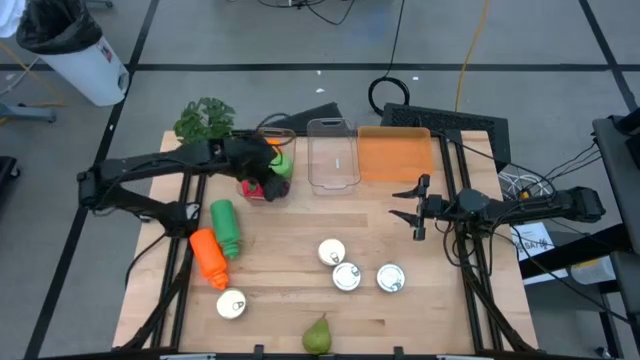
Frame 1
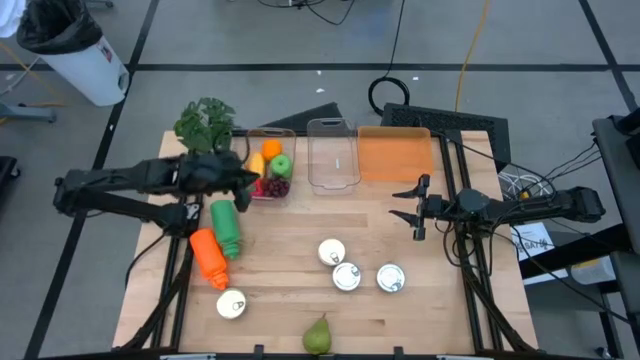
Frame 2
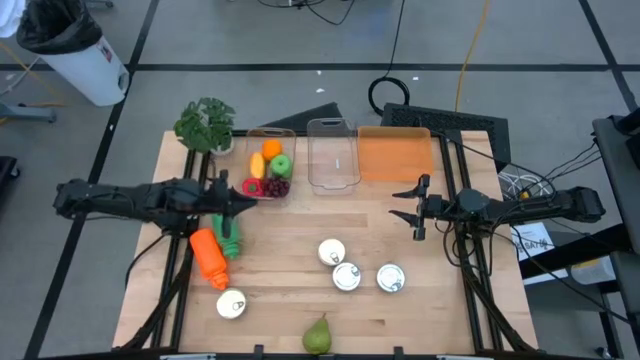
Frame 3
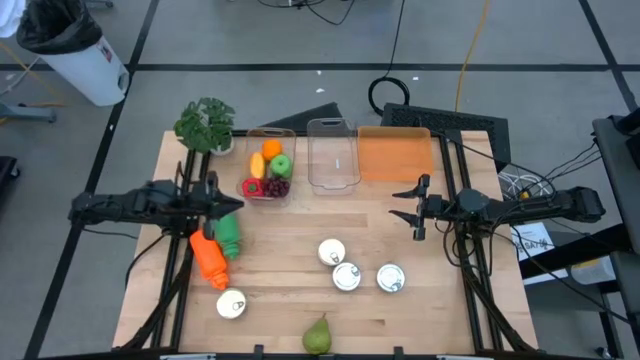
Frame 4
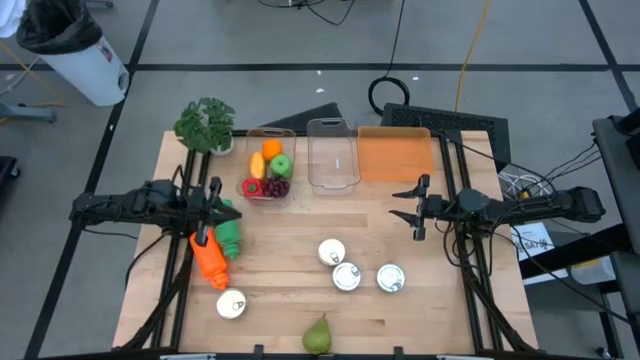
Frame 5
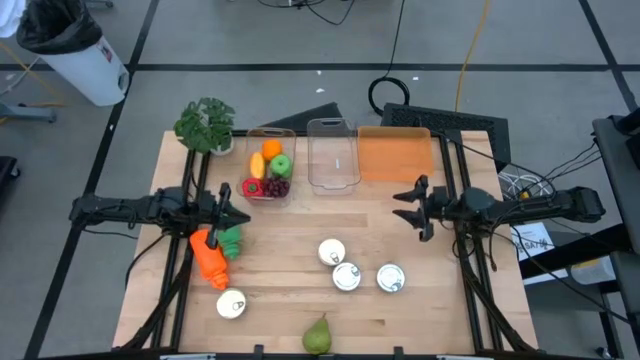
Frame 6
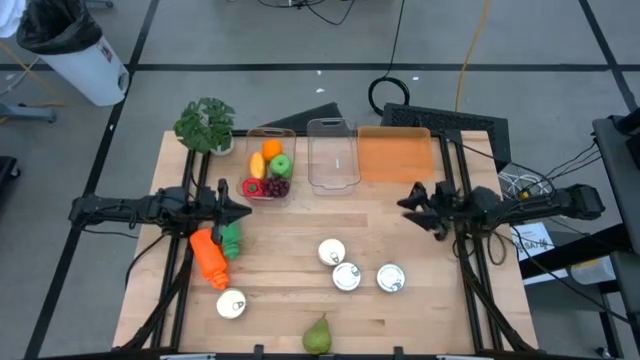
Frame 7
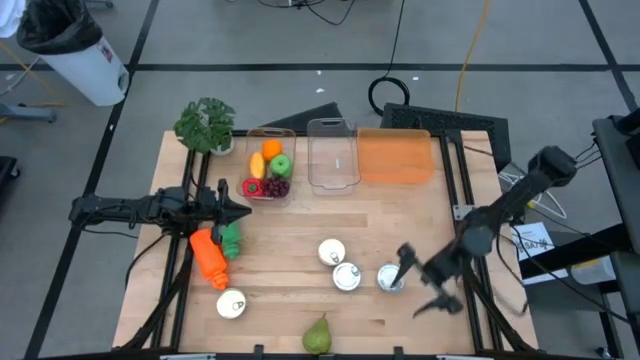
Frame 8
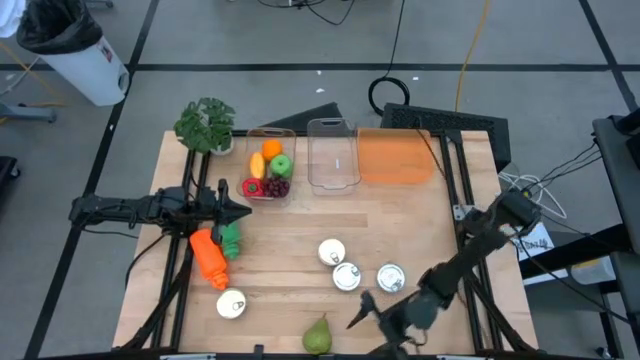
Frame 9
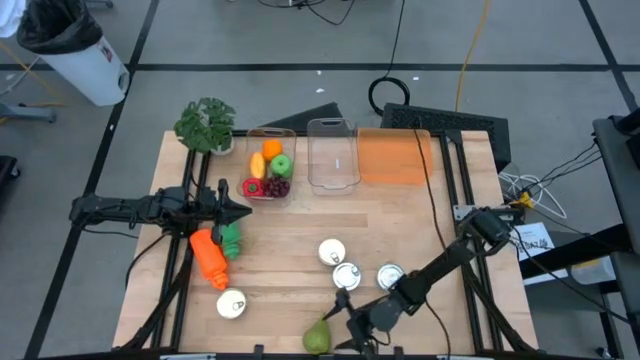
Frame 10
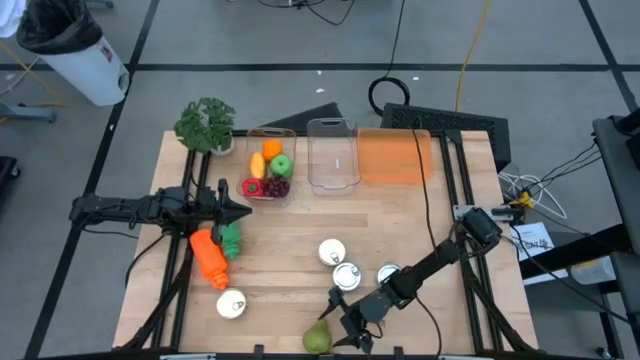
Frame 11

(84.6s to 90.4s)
Task: Pick & Place Food Item
Put the green pear into the left transparent bin

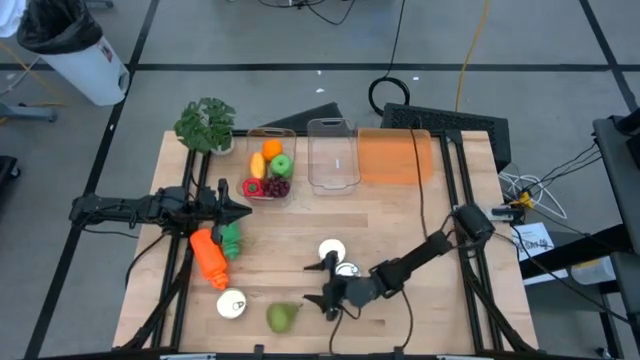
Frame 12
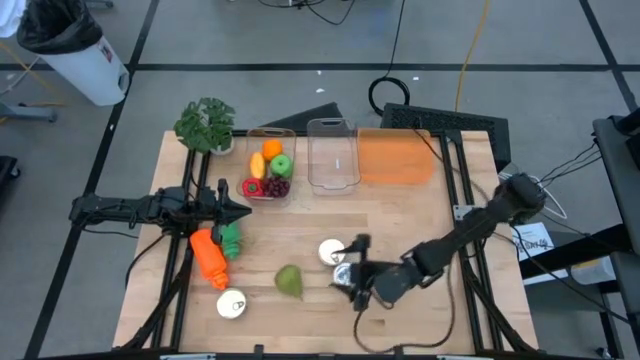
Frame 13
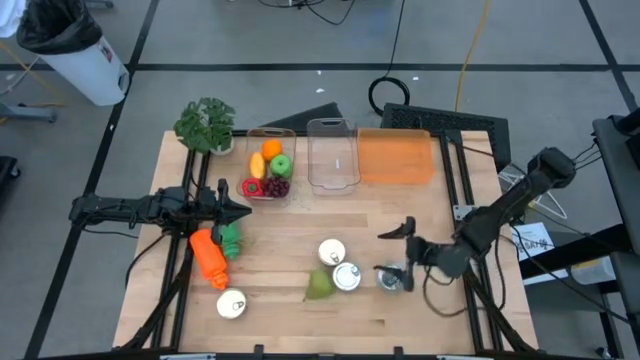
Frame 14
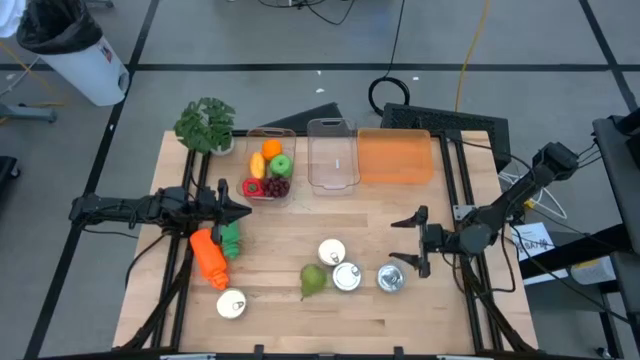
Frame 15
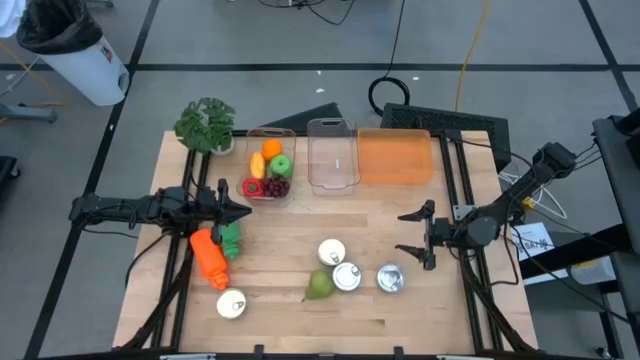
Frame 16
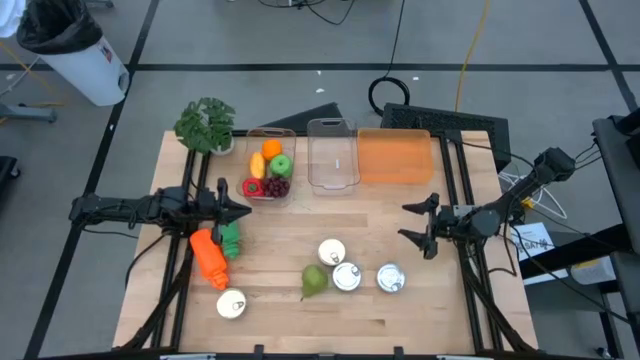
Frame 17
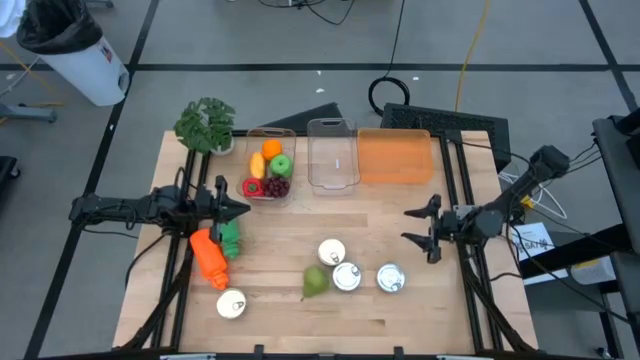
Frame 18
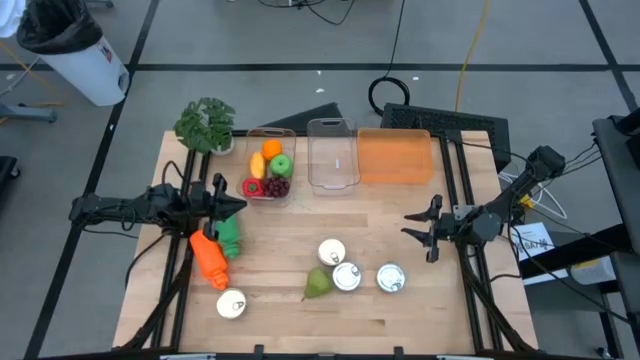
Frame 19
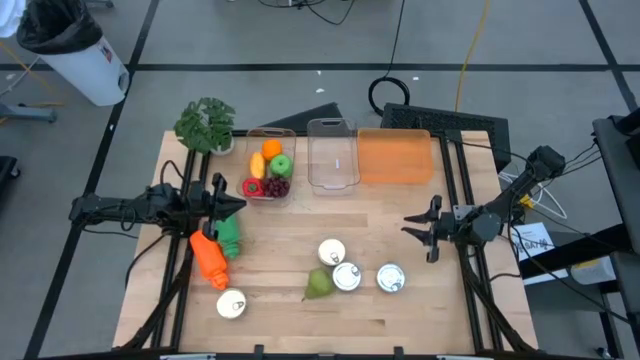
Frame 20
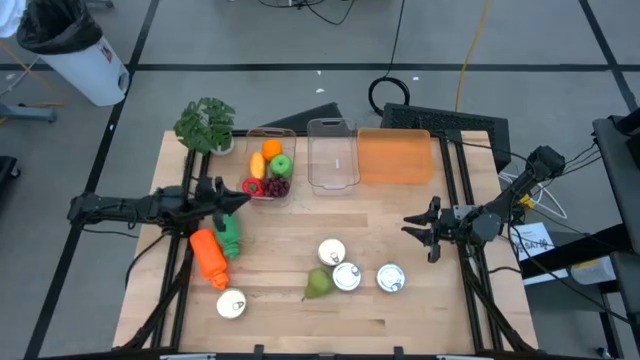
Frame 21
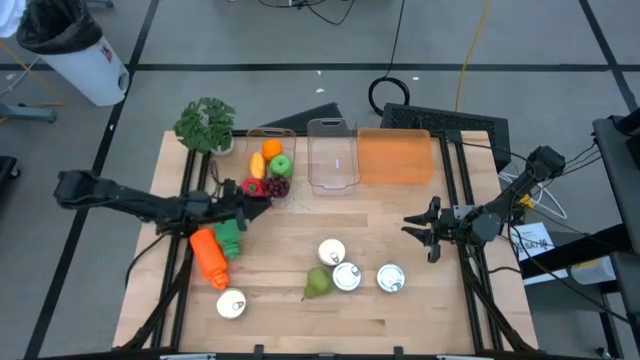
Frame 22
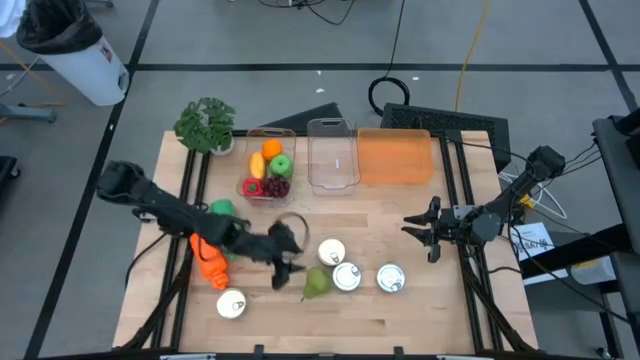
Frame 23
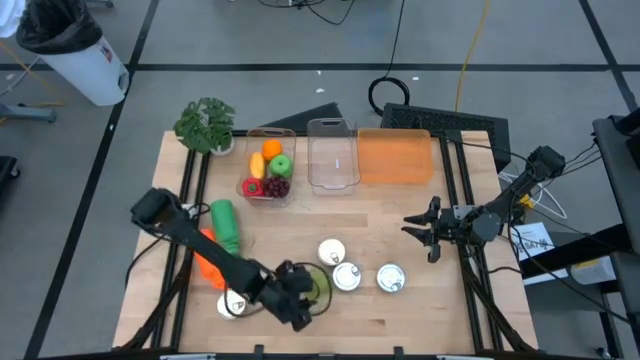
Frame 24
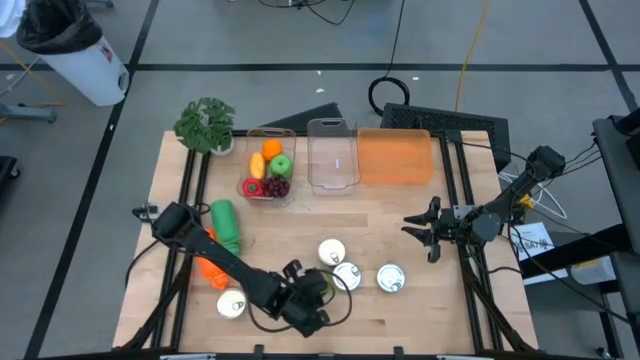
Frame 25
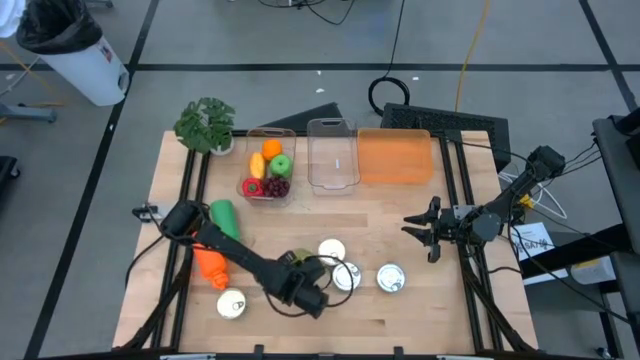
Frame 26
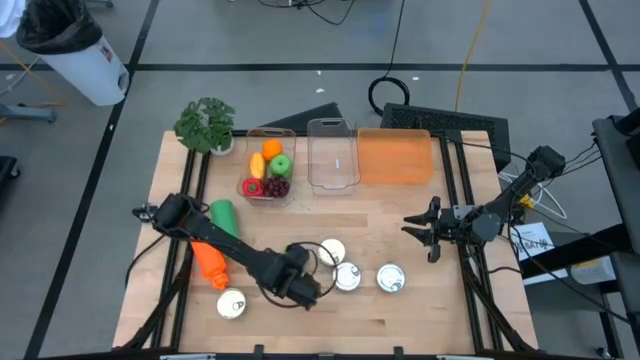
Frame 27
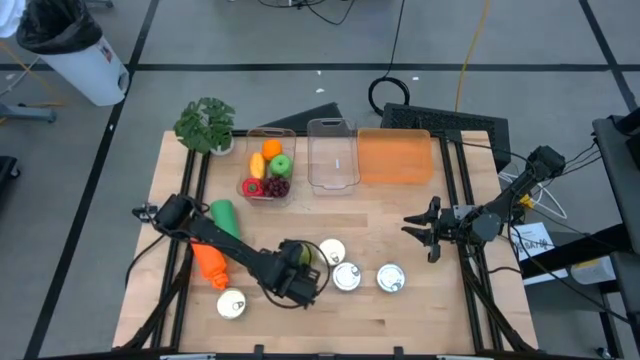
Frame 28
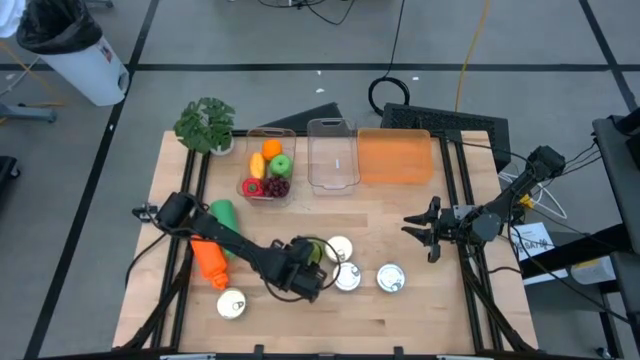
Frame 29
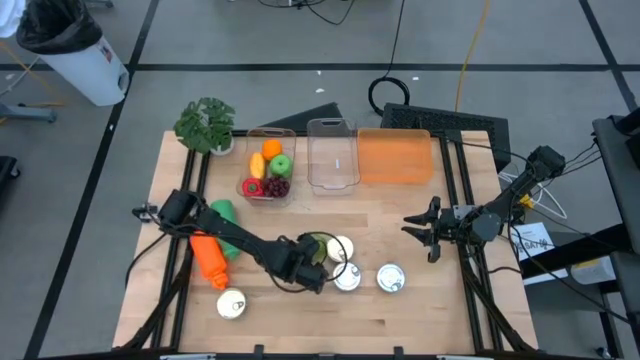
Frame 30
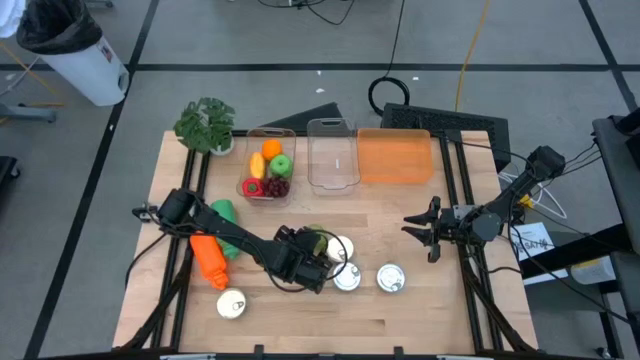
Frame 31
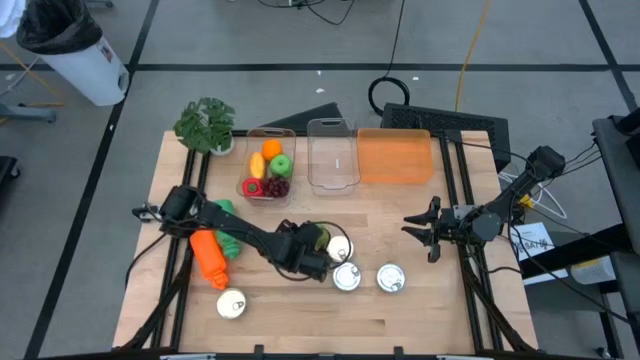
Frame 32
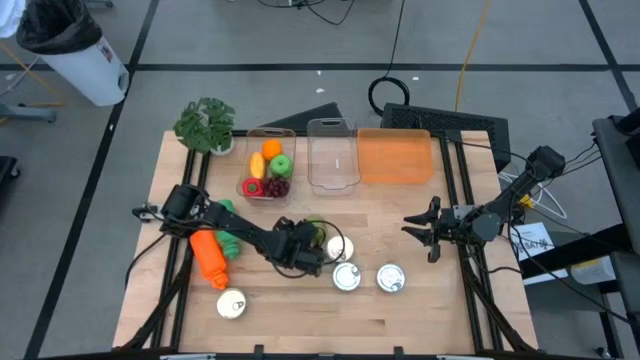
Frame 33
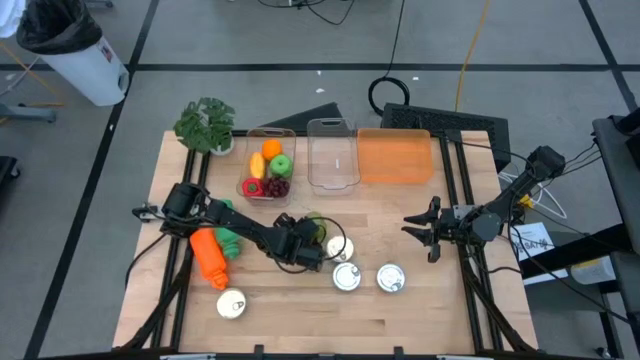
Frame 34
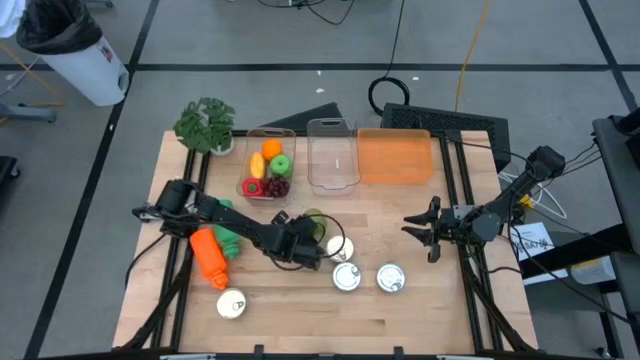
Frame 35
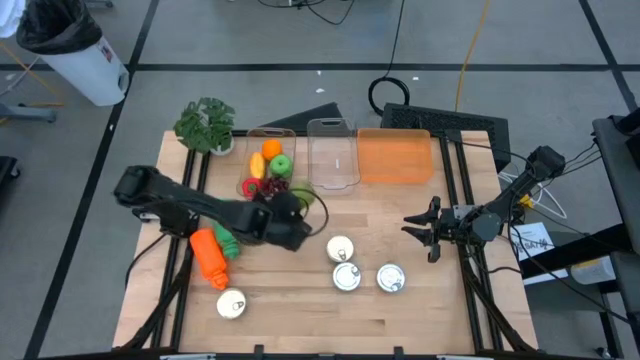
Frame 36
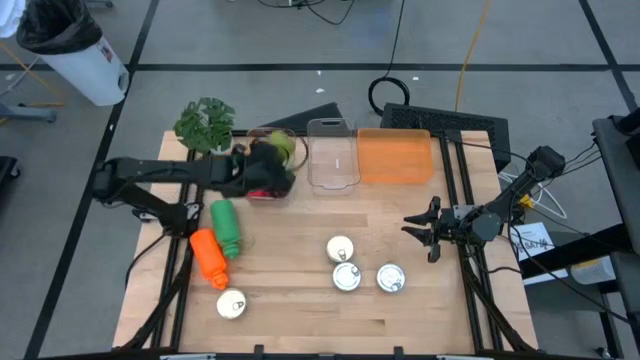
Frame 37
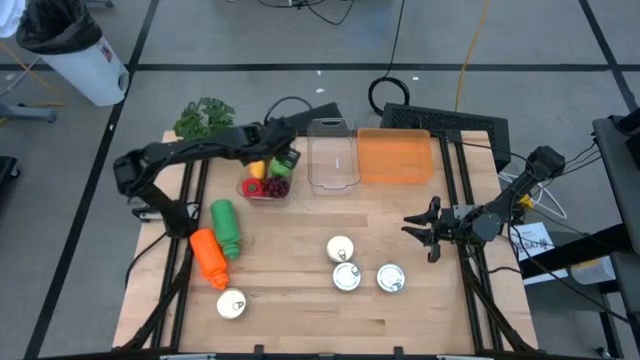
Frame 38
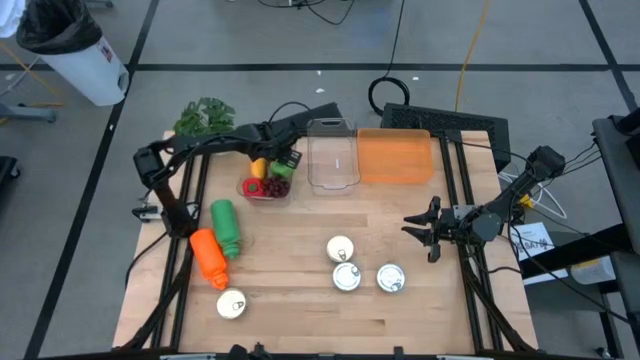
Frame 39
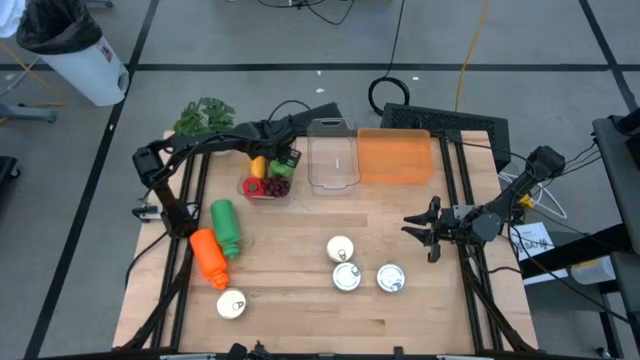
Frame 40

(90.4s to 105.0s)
Put the green pear into the left transparent bin
